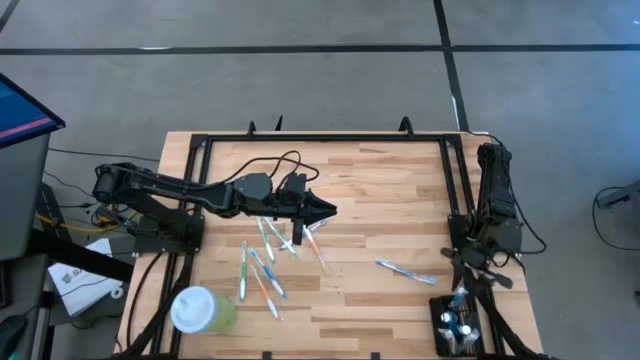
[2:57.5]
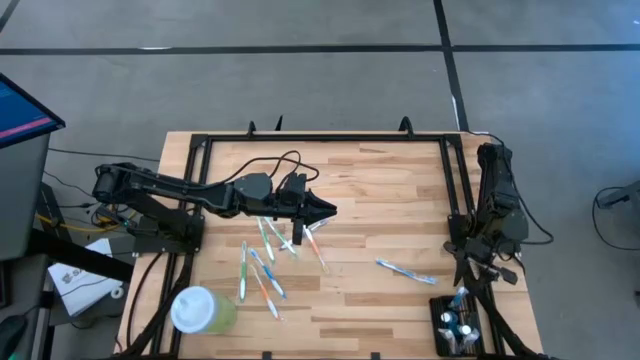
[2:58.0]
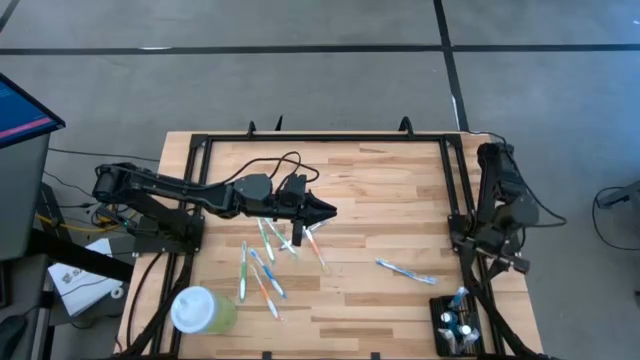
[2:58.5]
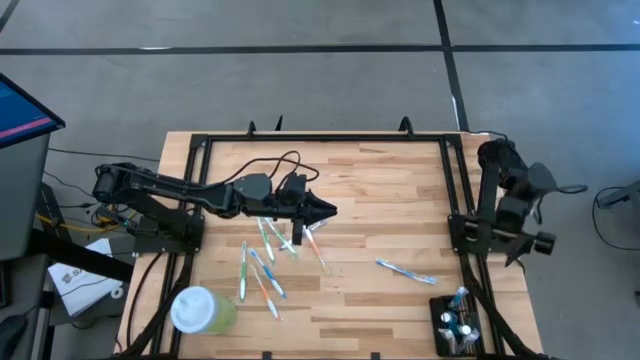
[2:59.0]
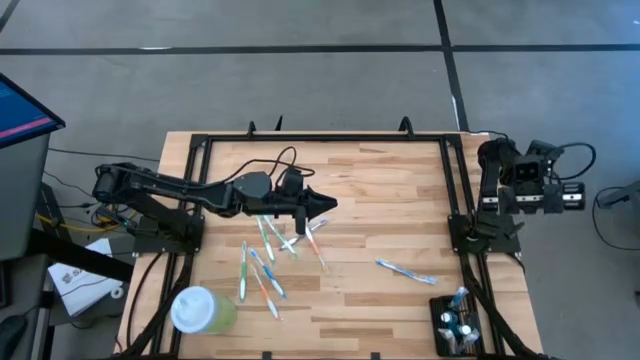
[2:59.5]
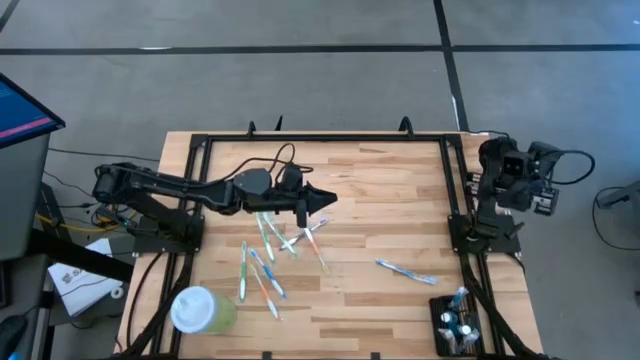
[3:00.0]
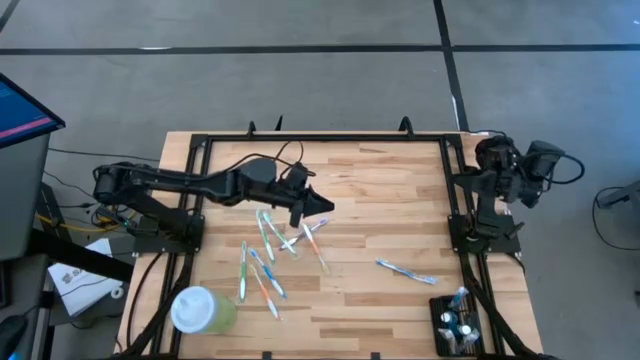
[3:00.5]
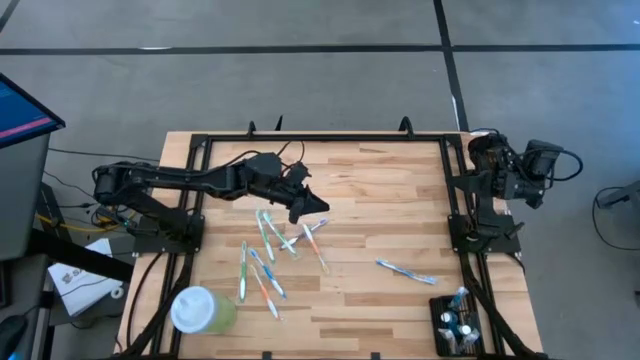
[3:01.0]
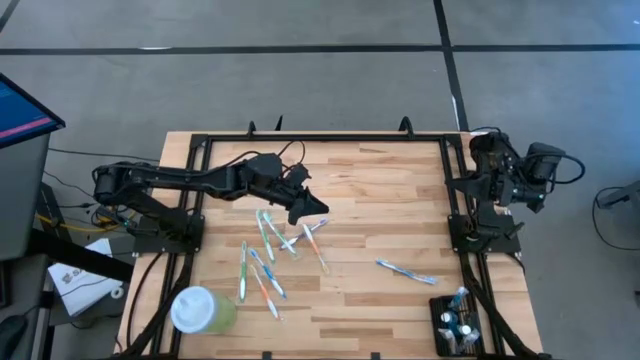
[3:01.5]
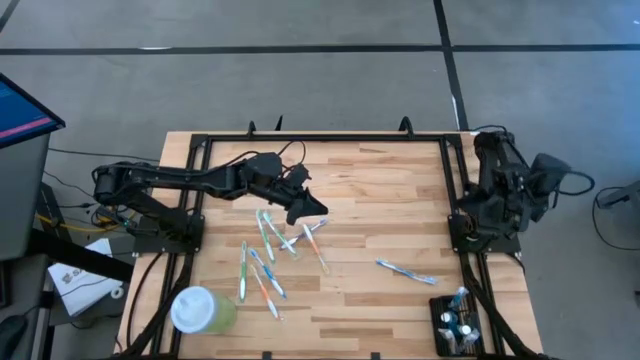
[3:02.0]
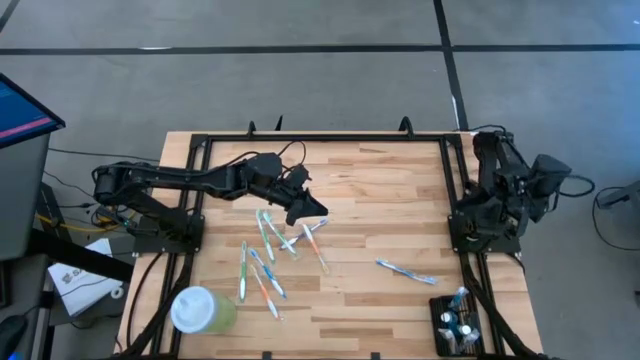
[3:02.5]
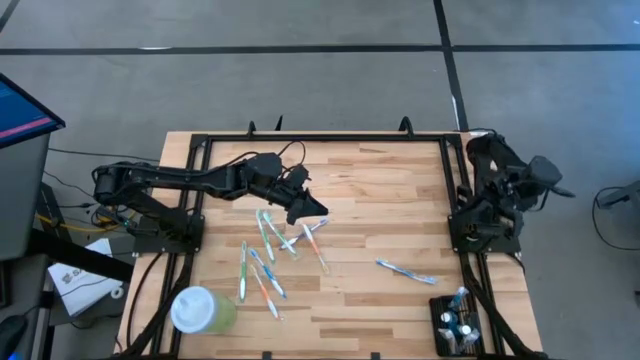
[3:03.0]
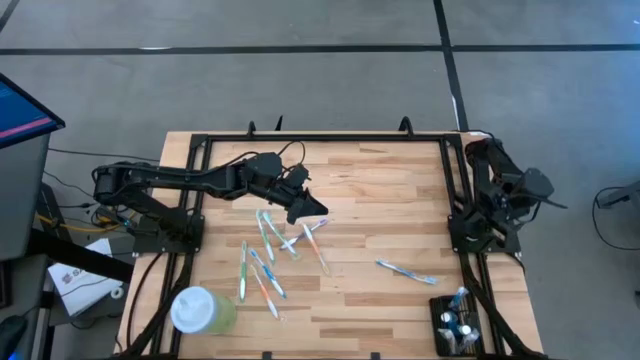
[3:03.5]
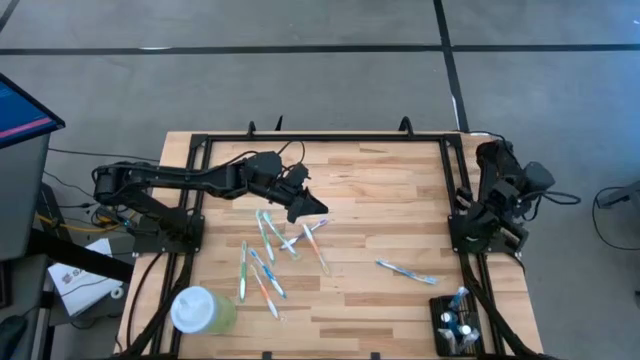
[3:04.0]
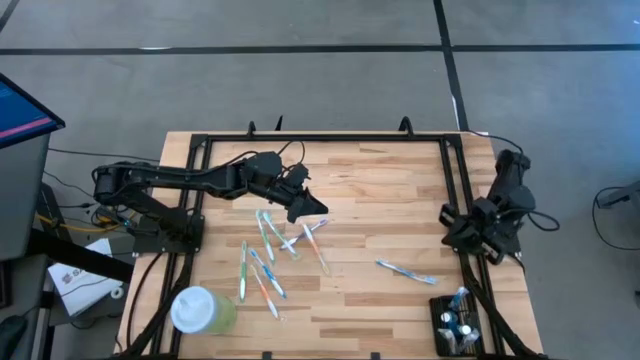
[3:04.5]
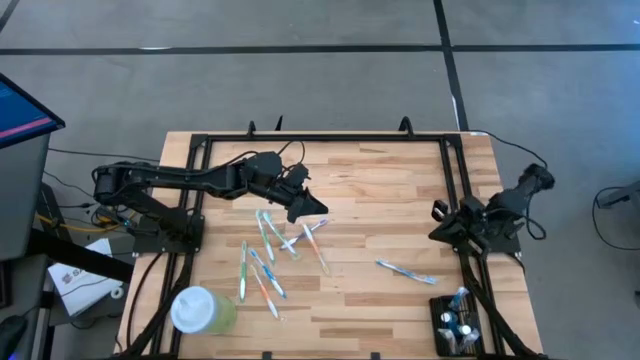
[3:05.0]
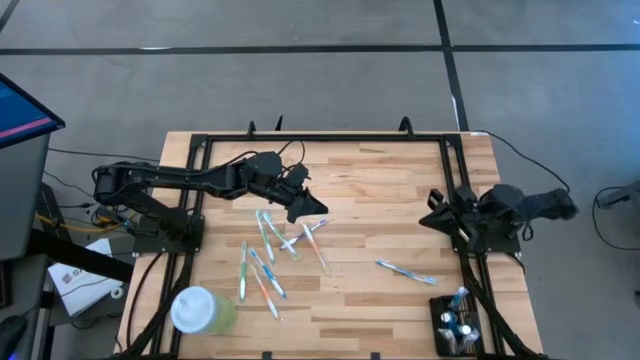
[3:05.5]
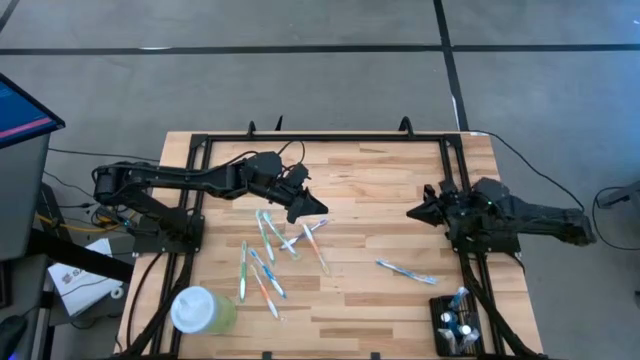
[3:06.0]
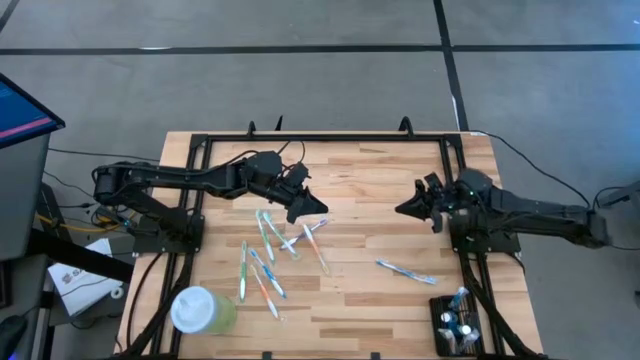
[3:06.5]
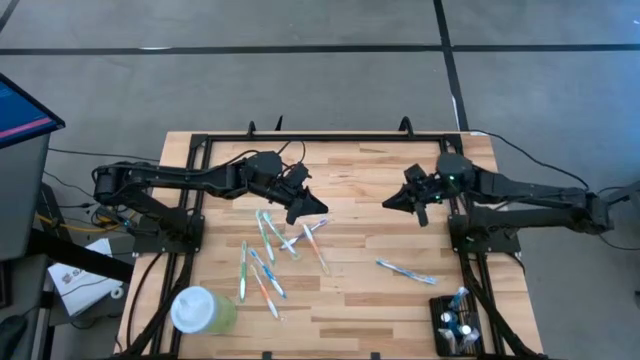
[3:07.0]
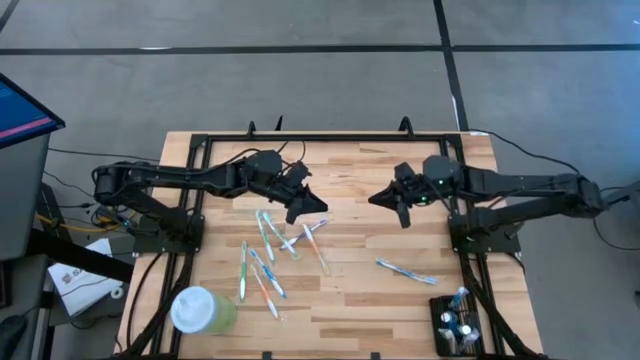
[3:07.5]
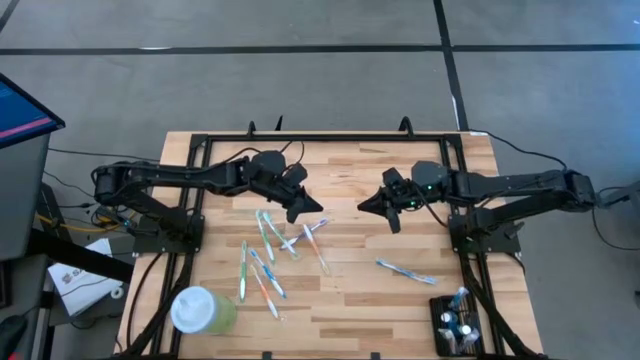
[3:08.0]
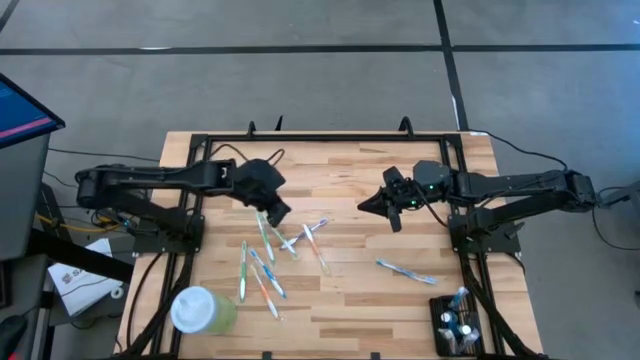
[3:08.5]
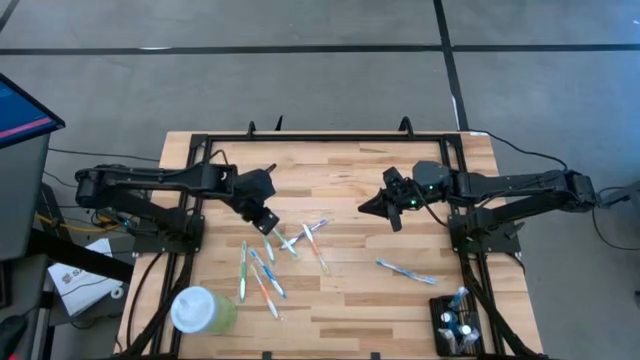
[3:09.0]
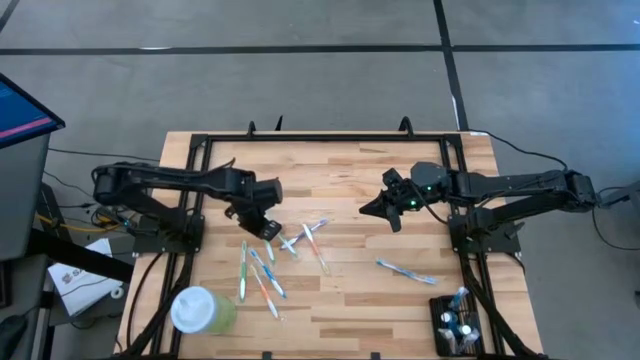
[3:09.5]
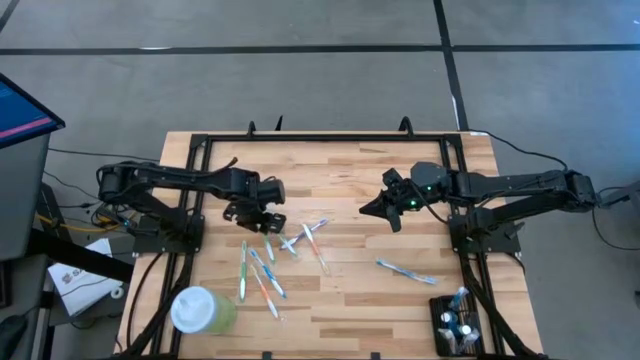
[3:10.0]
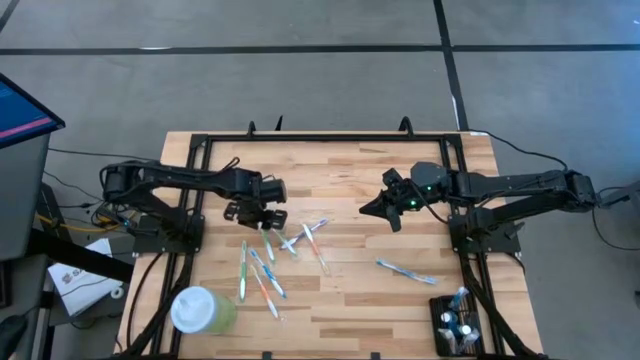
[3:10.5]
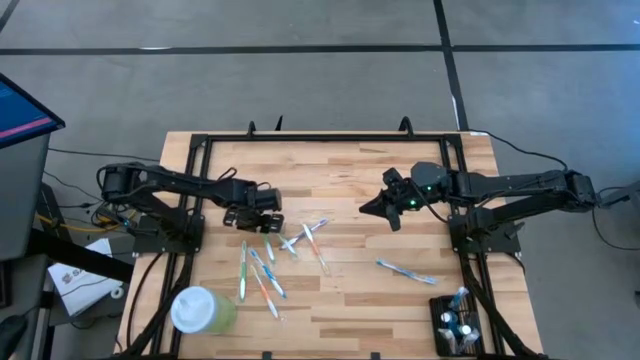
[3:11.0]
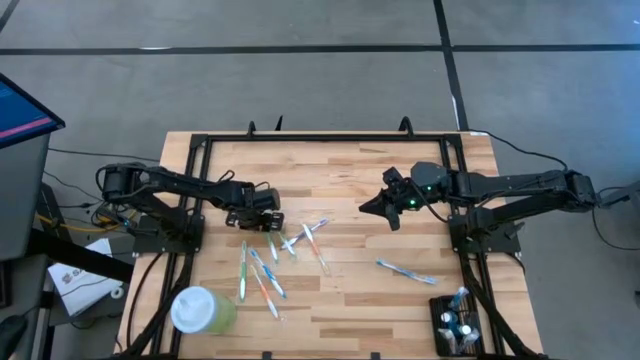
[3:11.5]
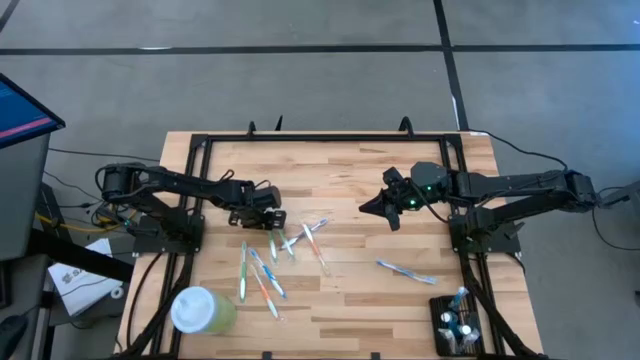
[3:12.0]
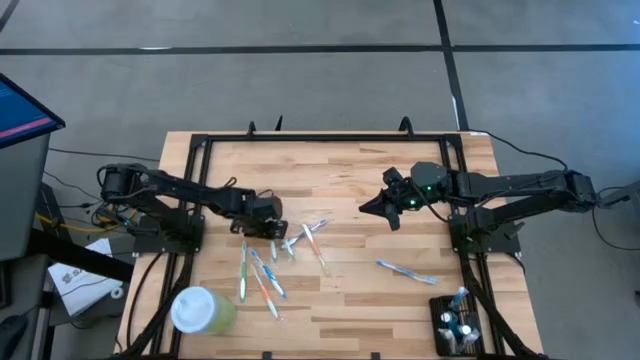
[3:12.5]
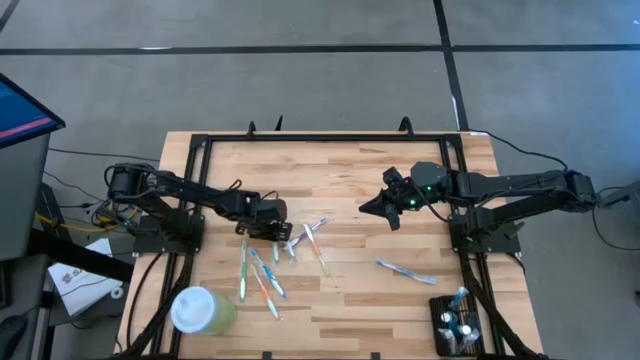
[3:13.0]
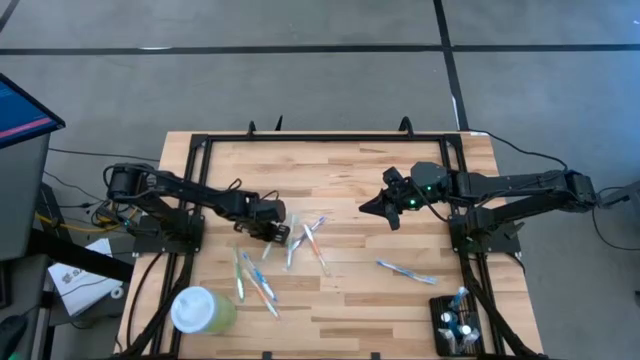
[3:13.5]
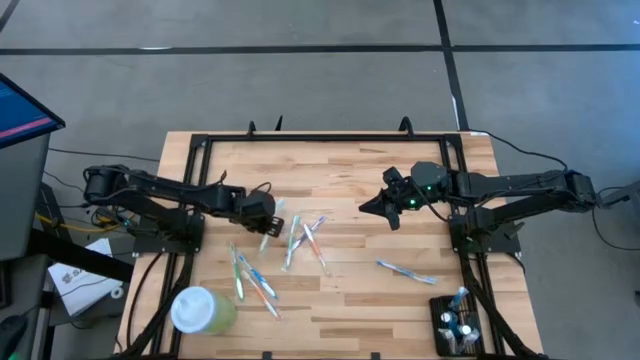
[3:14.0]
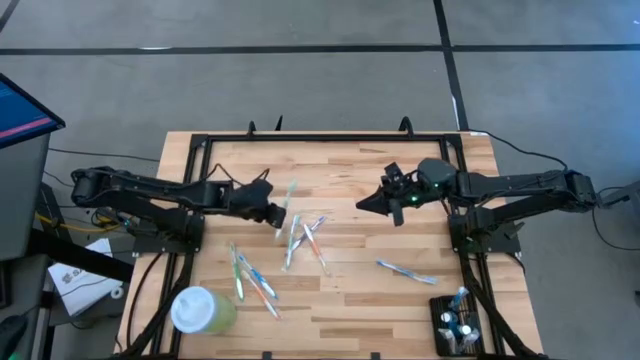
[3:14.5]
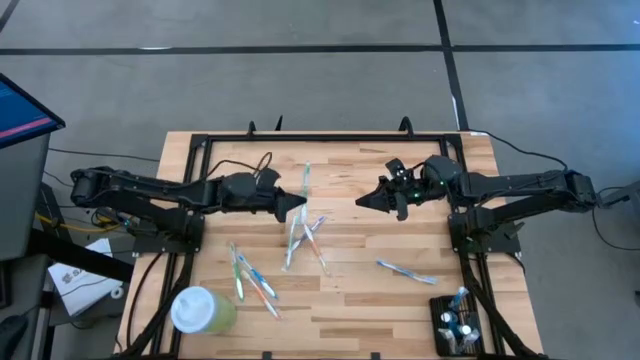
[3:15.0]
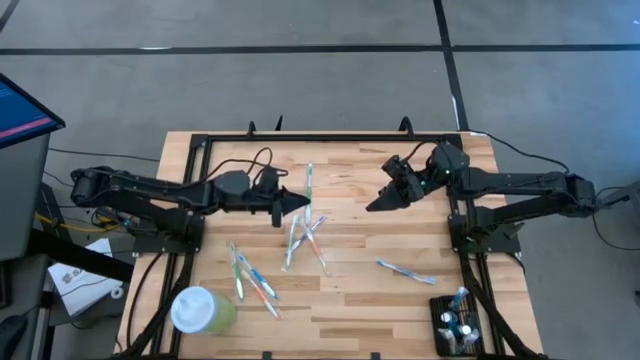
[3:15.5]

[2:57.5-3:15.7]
Task: Pick & Place toothbrushing station
Put the top left green toothbrush into the black organizer

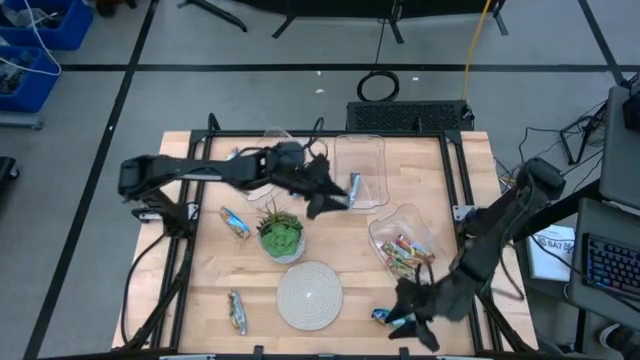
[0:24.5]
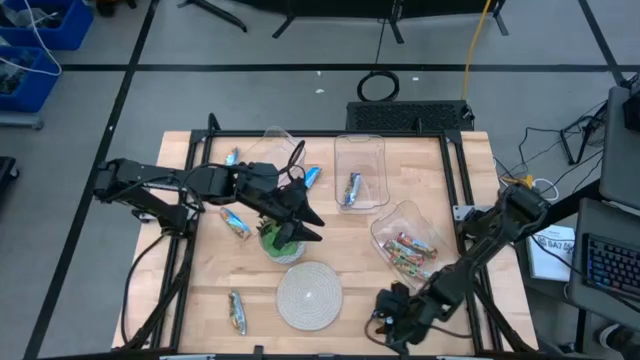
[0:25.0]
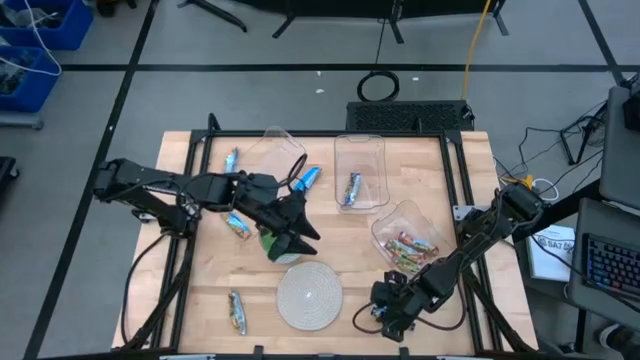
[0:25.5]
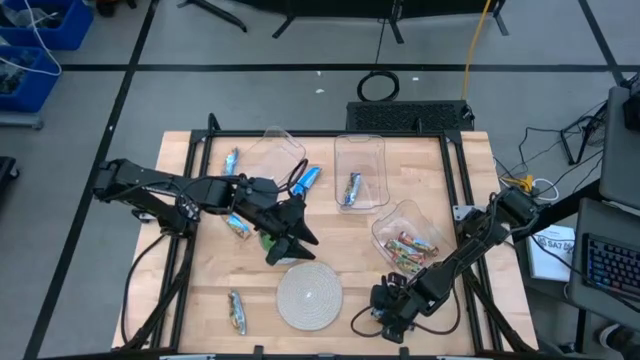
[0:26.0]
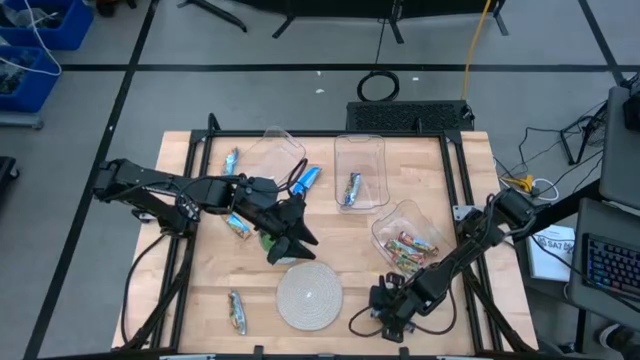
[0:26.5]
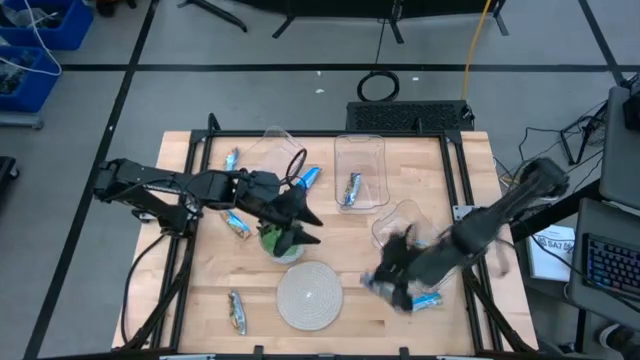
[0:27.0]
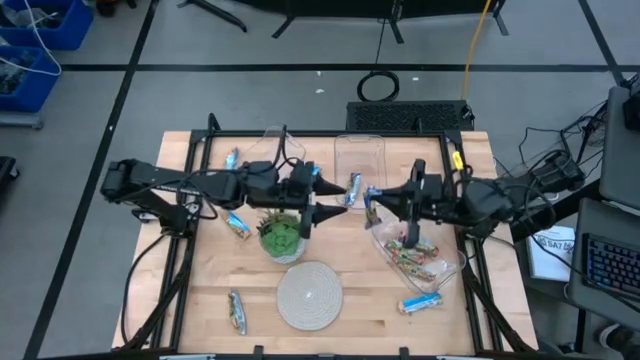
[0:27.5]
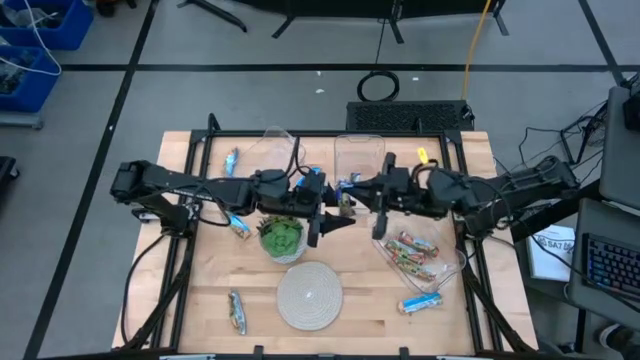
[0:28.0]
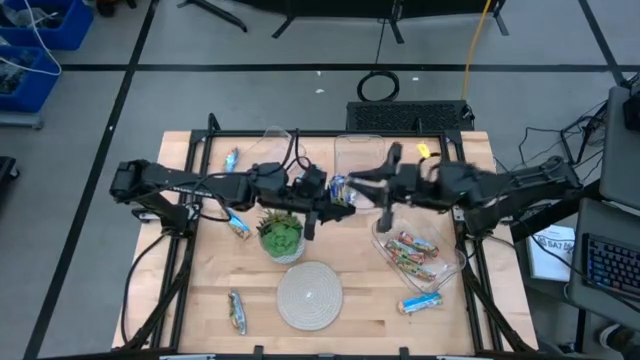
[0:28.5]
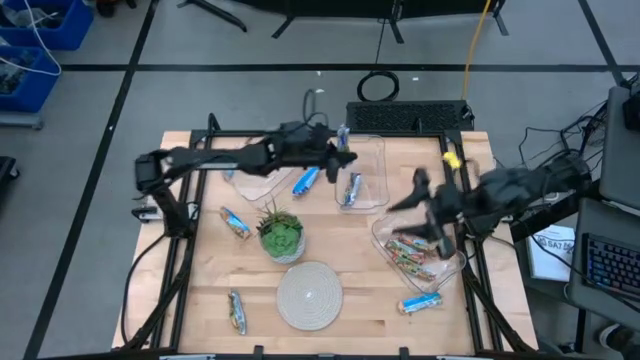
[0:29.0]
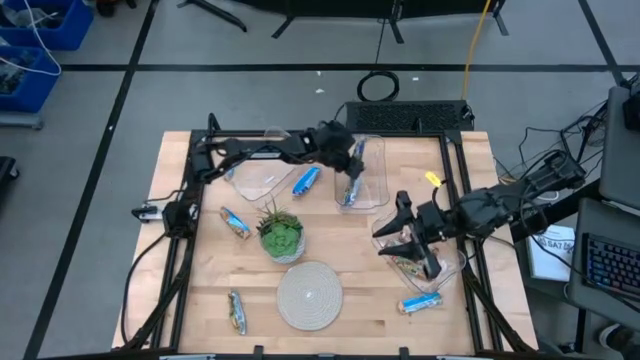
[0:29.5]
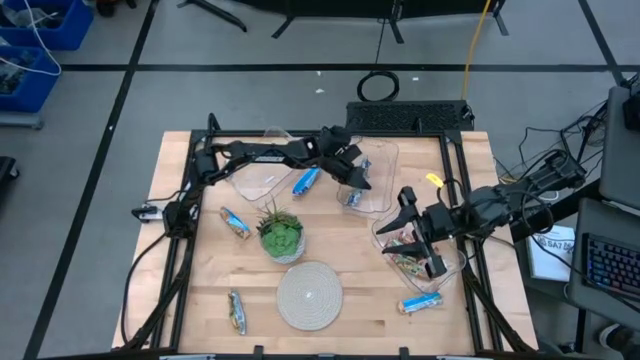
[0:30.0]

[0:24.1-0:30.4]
Task: Pick and place Granola Bars by type
Put the blue granola bar into the top right transparent bin
